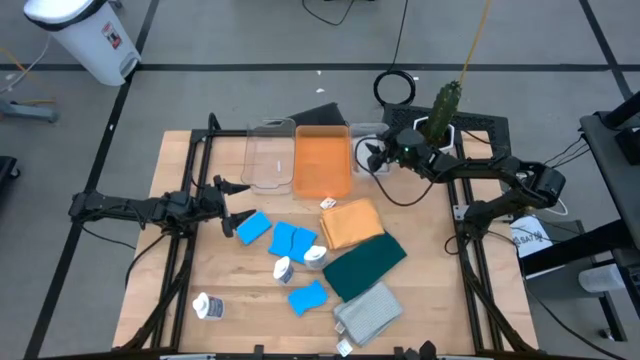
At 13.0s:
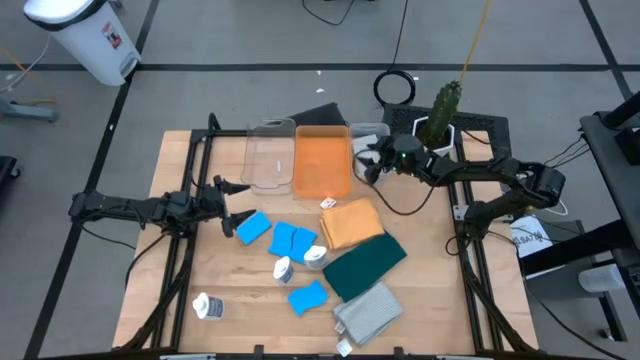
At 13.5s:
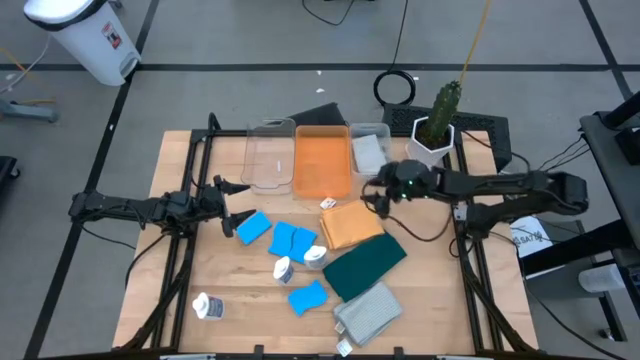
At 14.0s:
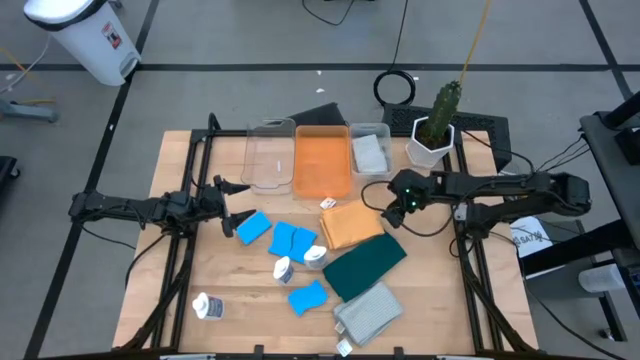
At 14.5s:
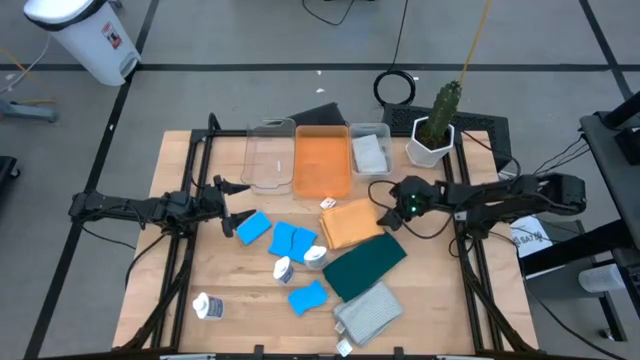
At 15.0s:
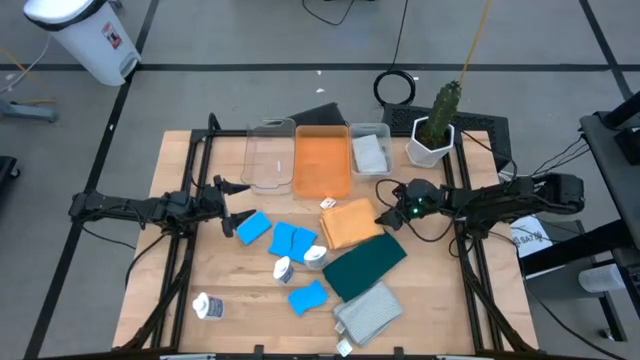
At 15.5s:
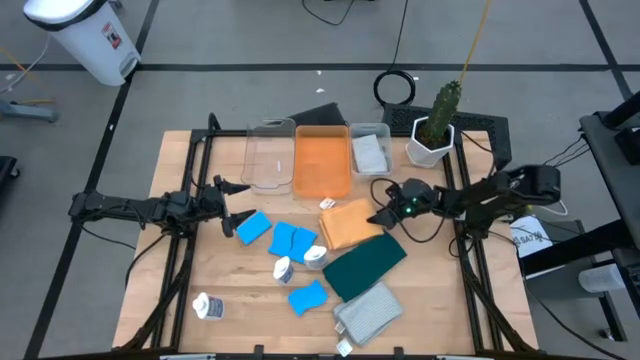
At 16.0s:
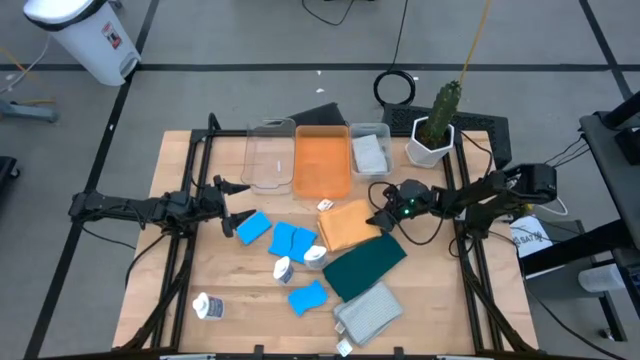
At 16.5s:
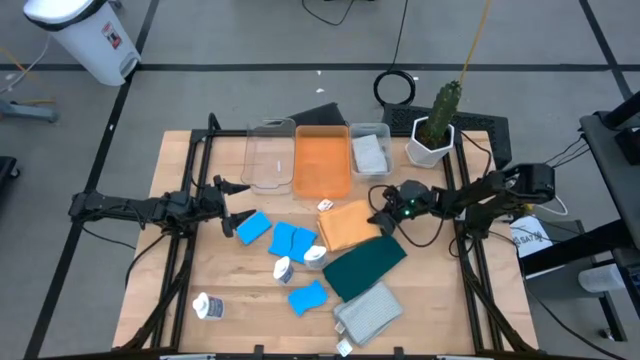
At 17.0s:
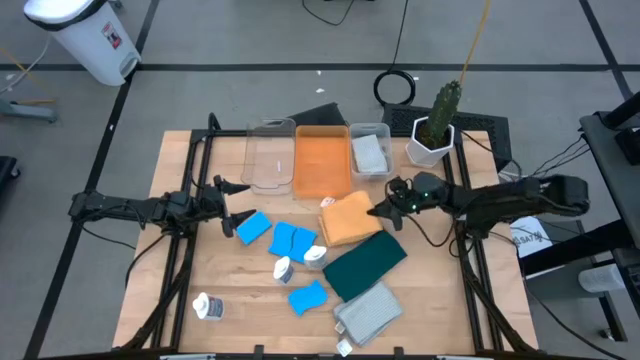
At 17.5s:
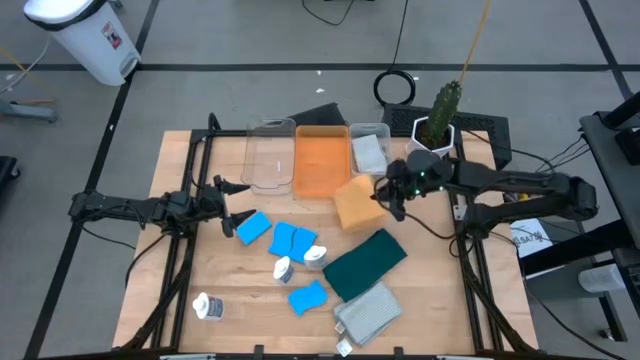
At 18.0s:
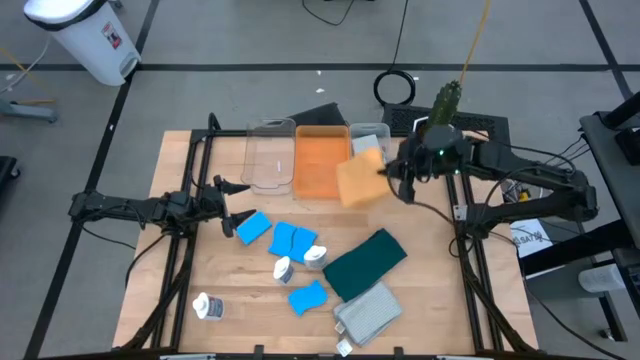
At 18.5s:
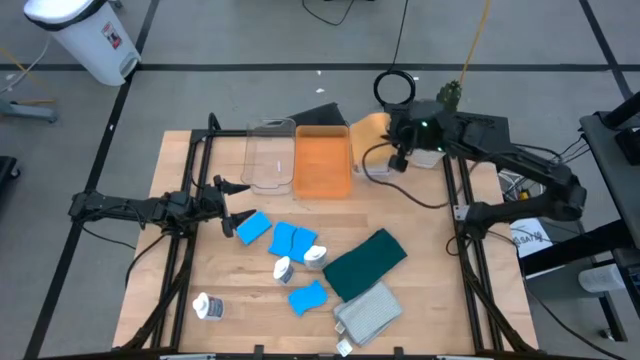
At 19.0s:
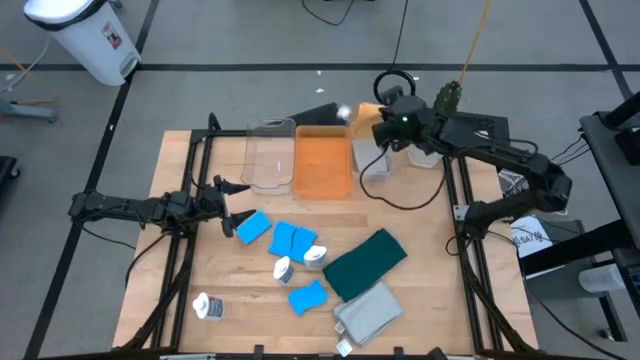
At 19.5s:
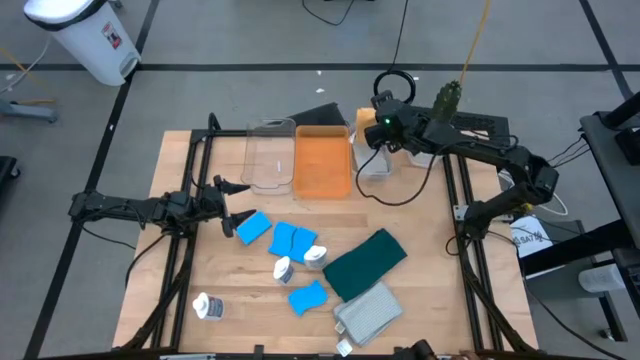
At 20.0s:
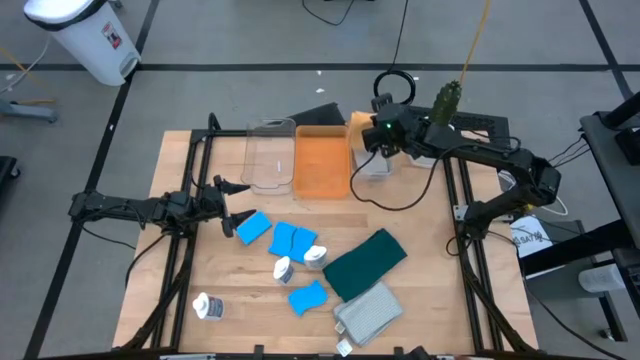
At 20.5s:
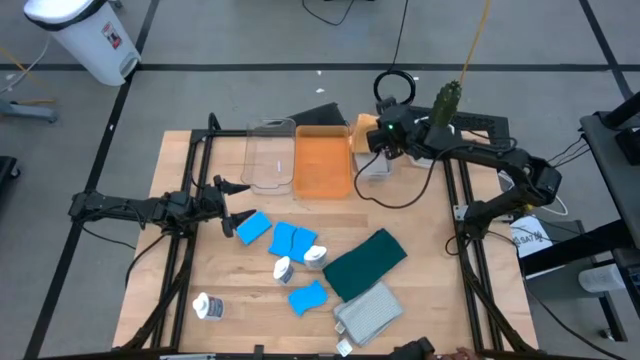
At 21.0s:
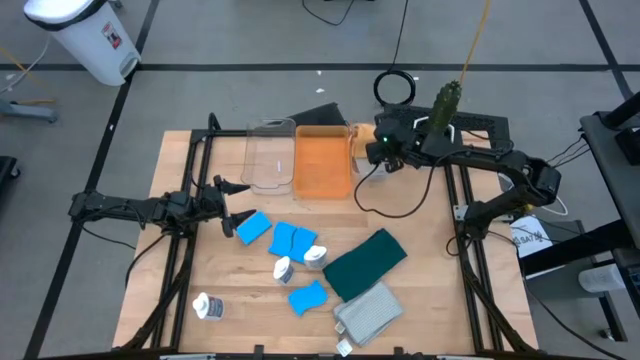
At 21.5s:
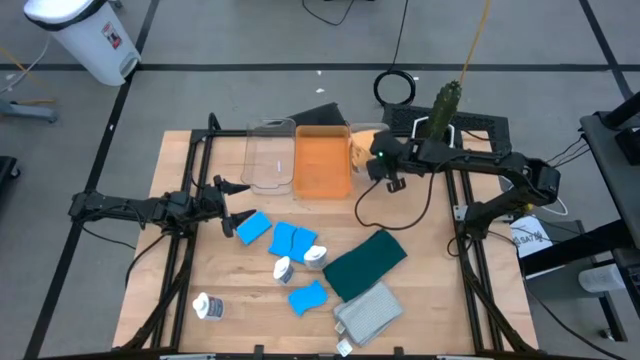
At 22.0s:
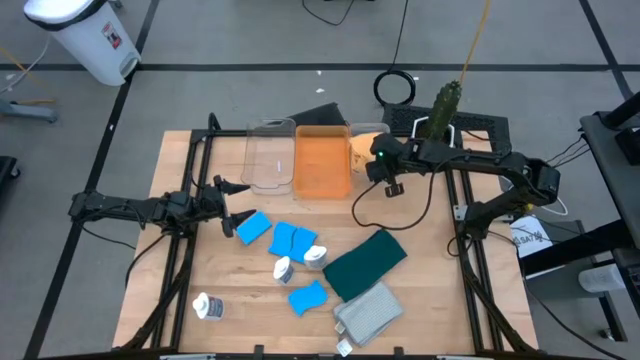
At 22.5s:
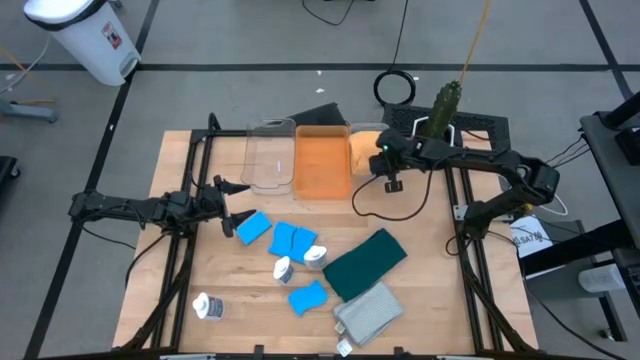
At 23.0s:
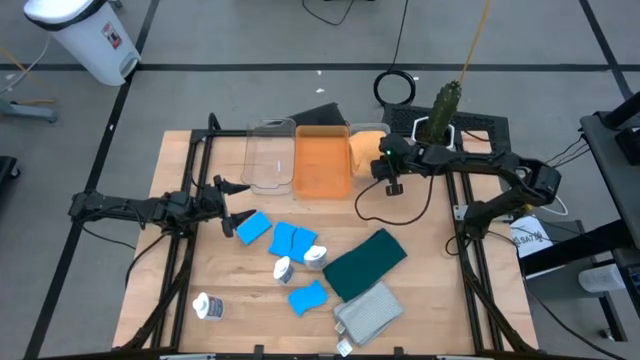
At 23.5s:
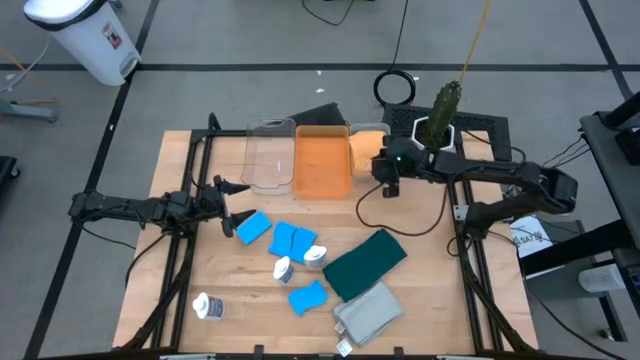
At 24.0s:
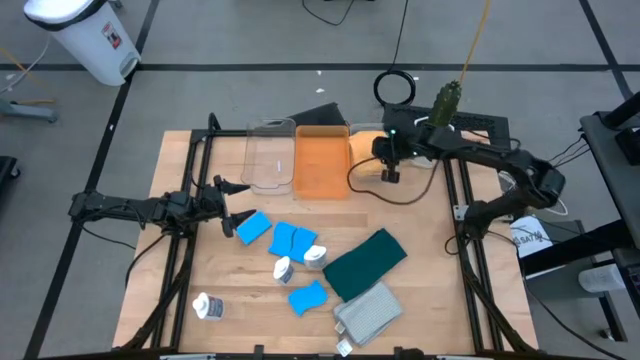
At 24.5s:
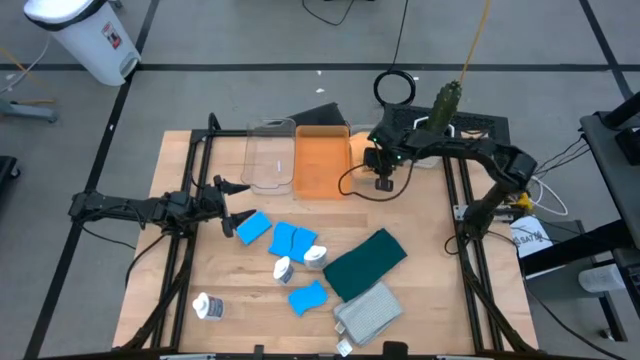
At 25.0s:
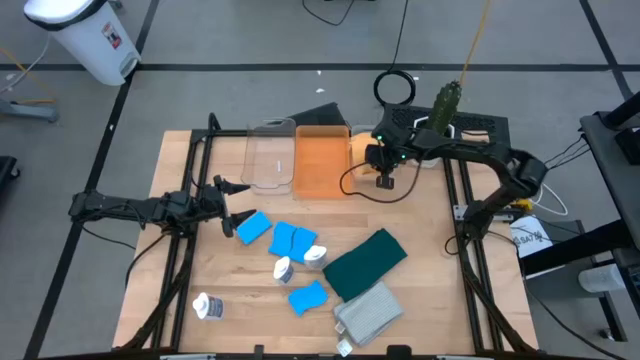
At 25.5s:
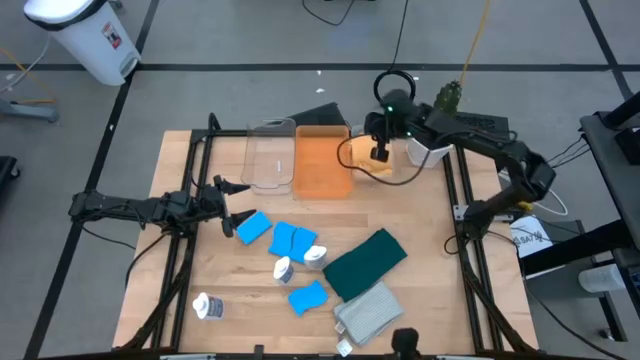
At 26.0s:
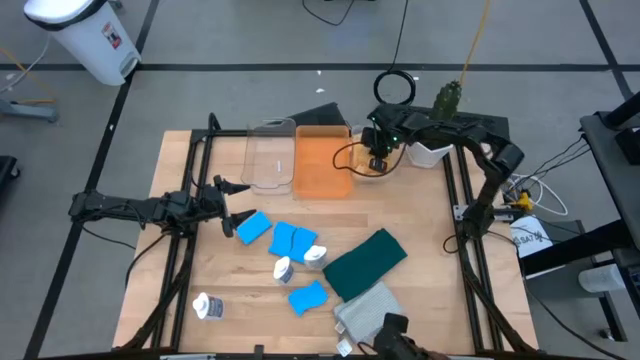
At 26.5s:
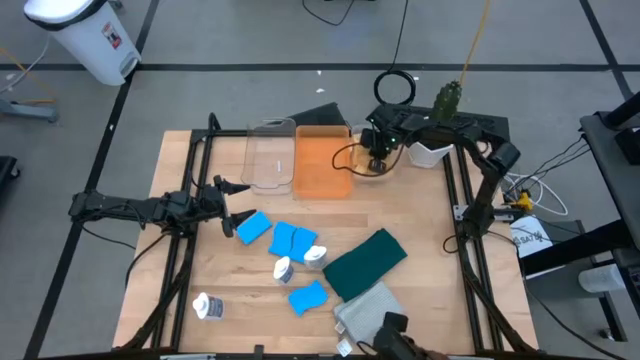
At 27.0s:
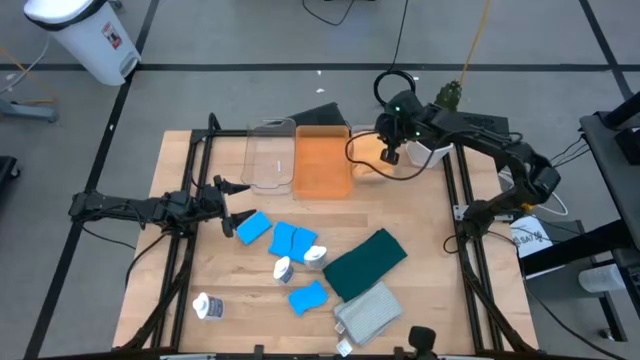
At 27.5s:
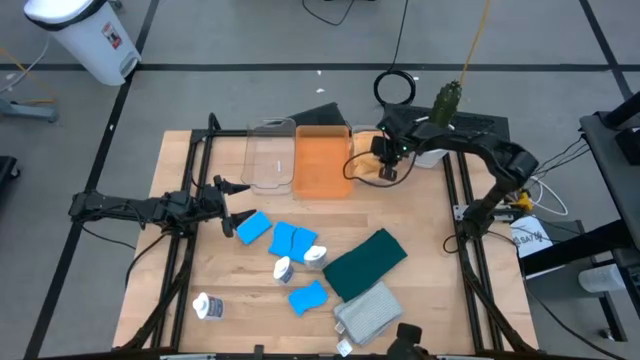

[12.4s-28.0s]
Task: Pick & Place Kitchen Items
Put the yellow microfiber cloth into the white bin

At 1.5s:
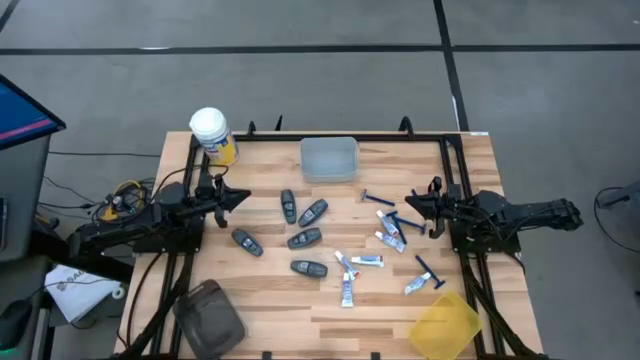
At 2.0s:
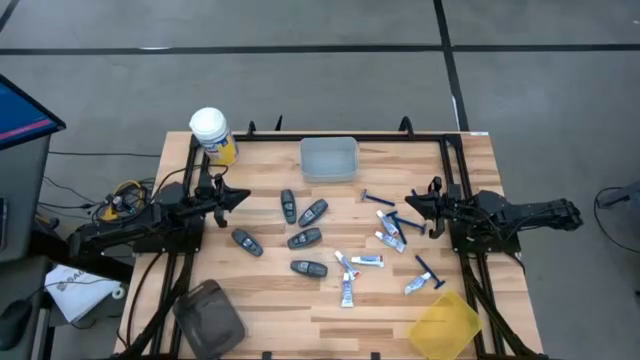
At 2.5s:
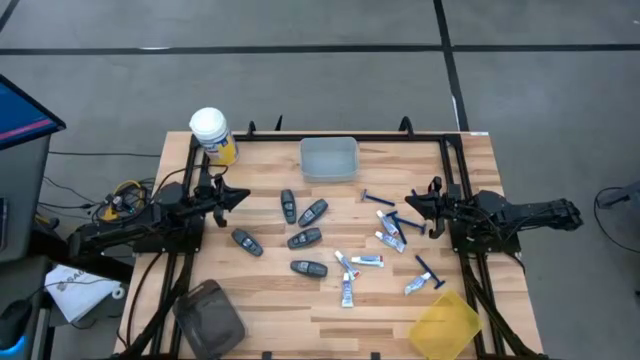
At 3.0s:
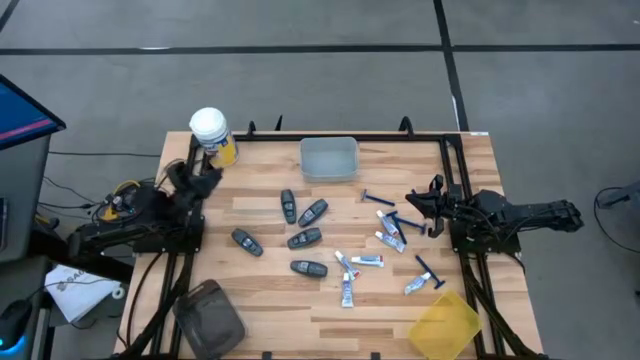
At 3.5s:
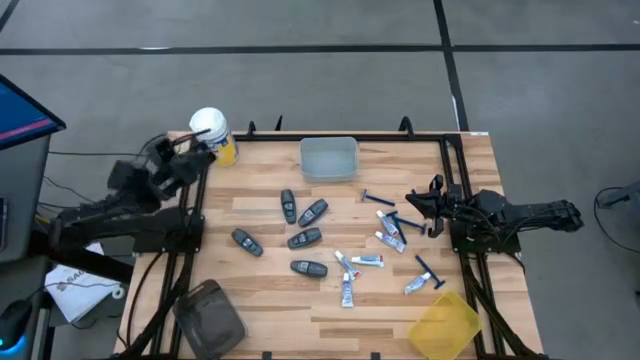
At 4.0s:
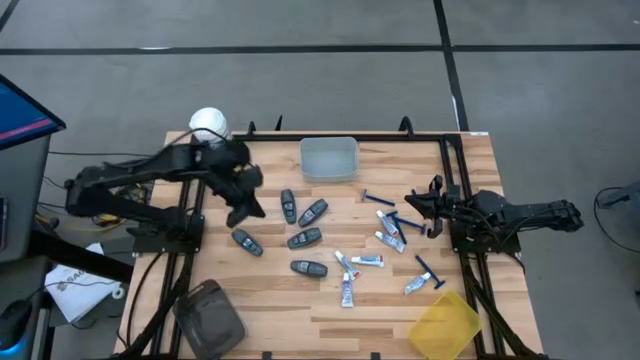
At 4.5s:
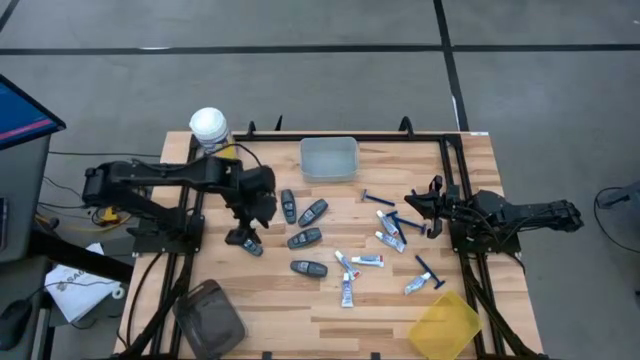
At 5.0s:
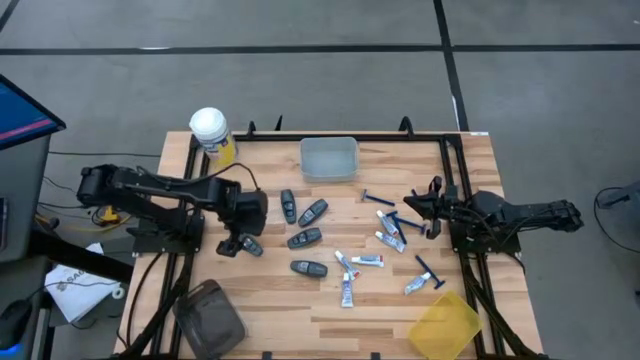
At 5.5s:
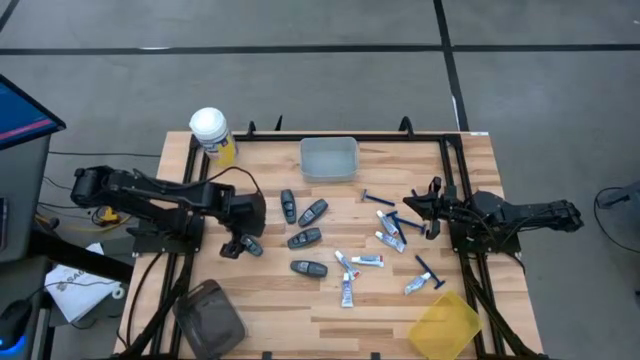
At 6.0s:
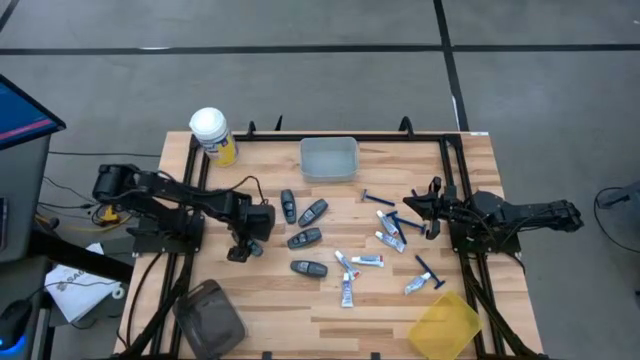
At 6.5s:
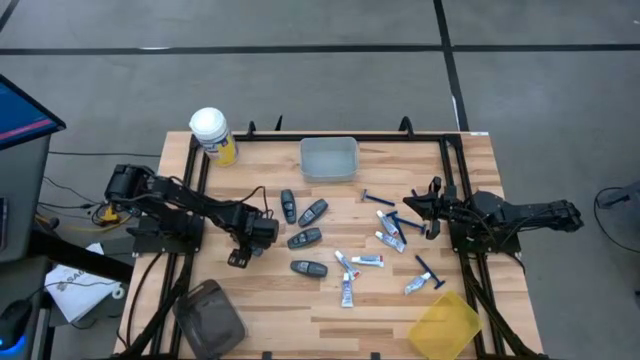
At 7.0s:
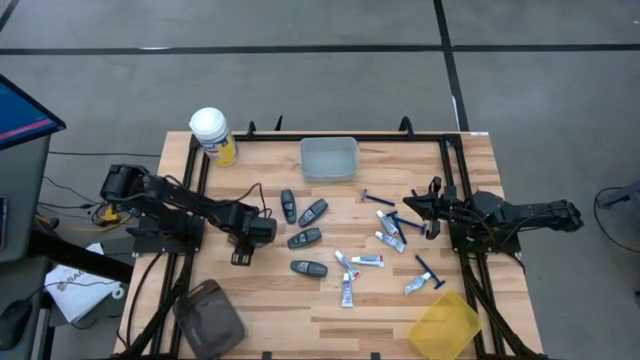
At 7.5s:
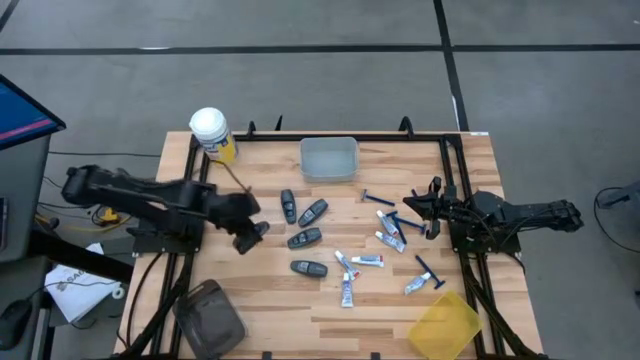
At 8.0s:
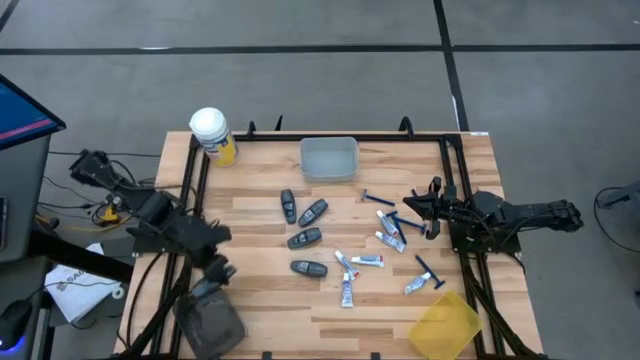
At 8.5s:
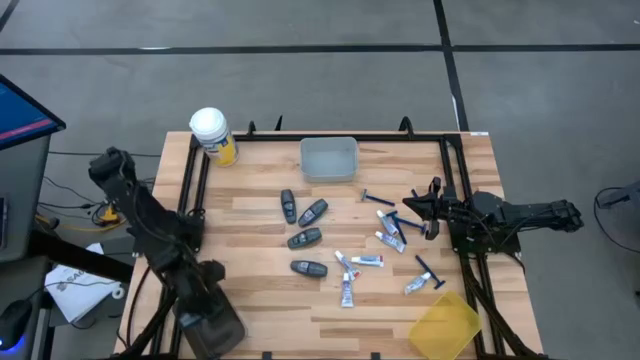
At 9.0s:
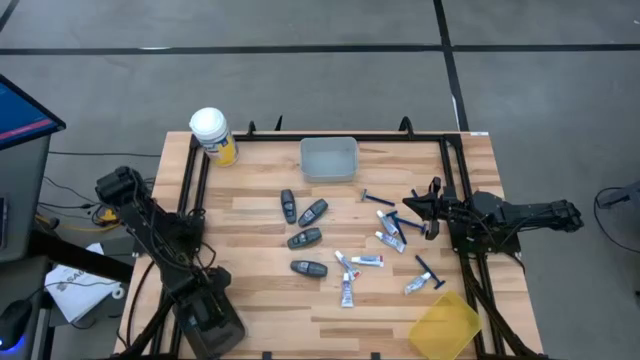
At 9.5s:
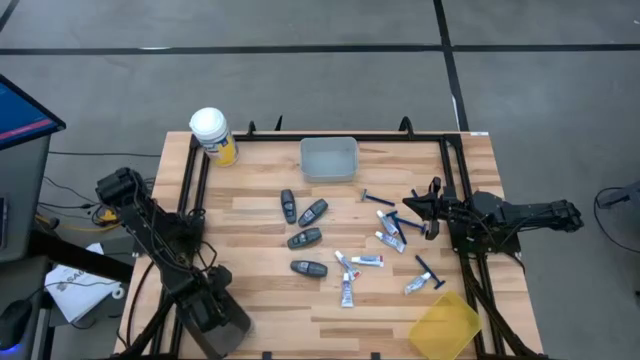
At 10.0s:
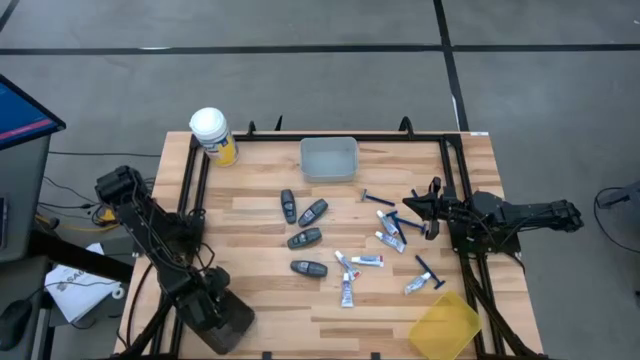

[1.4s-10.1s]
Task: Pick & Place Travel size toiletries
Put the black deodorant into the black bin
